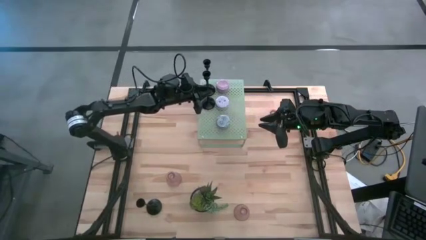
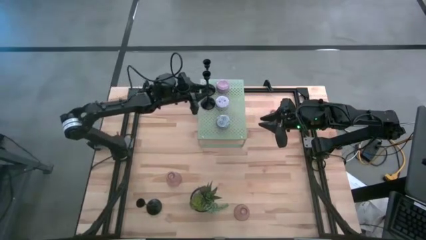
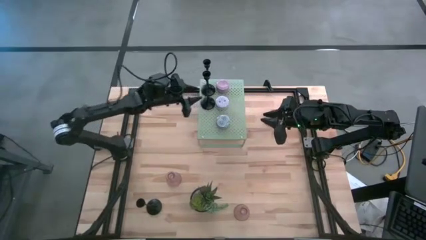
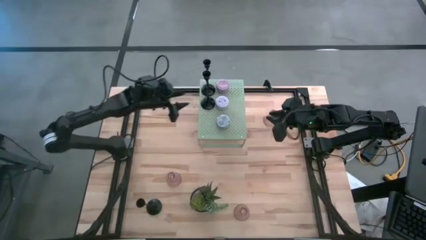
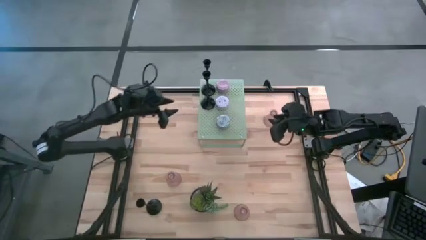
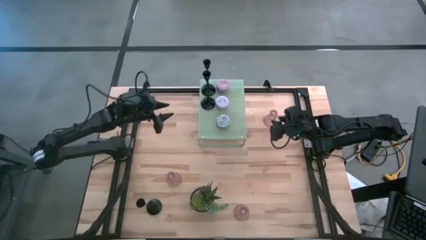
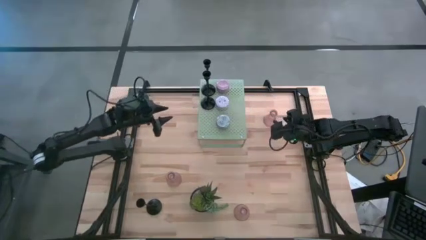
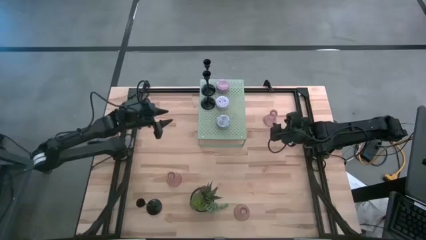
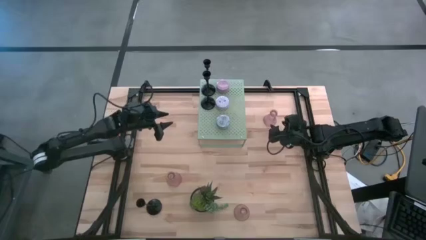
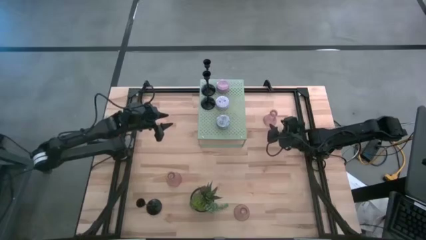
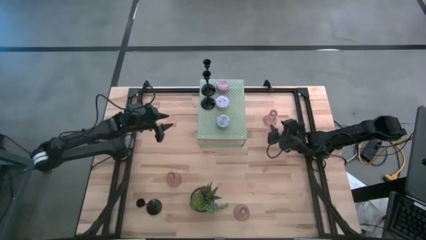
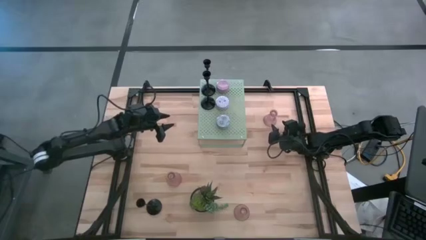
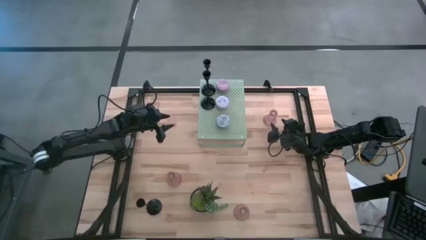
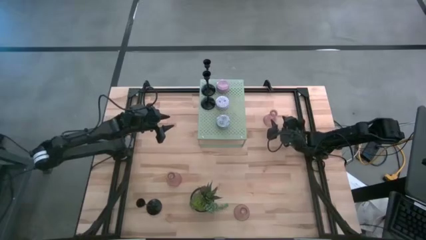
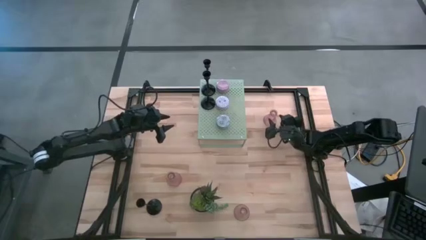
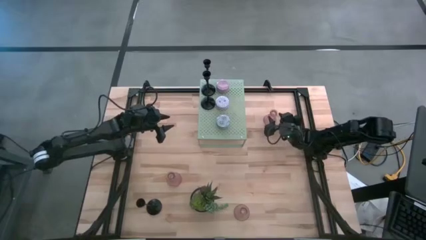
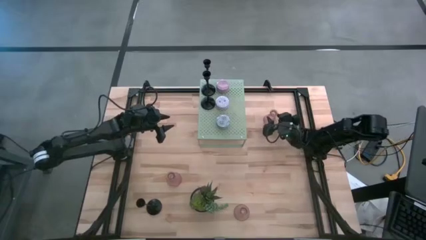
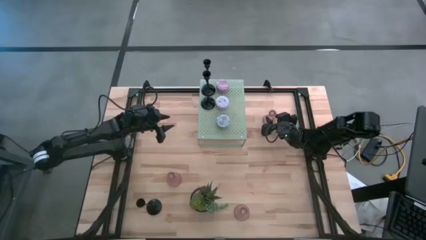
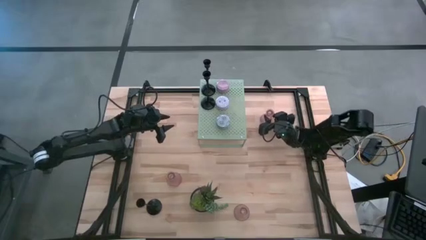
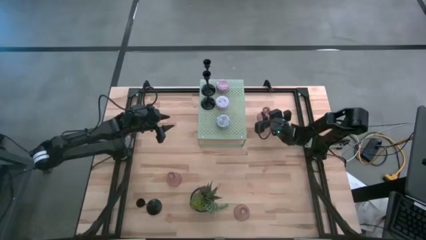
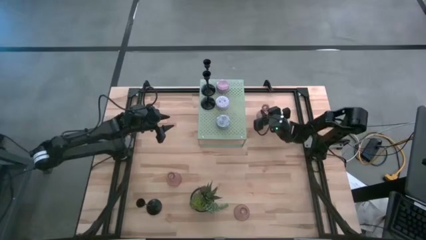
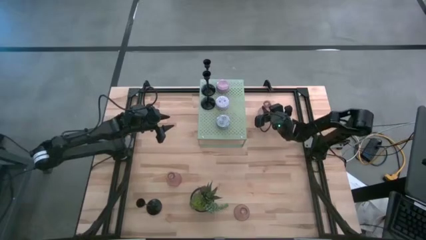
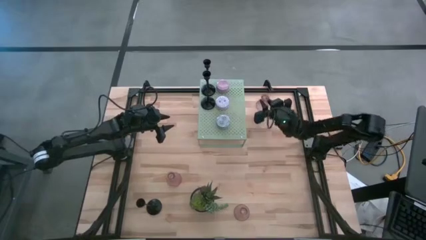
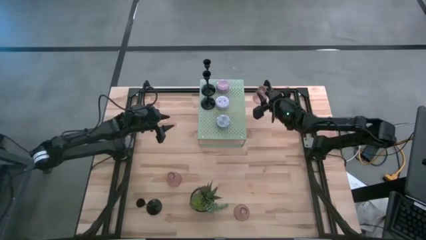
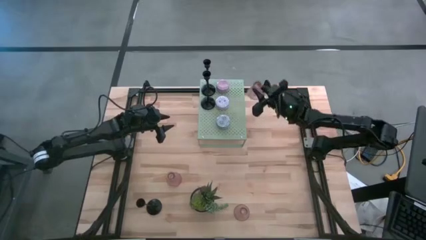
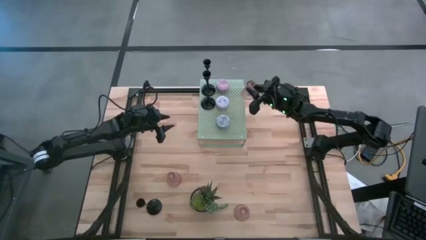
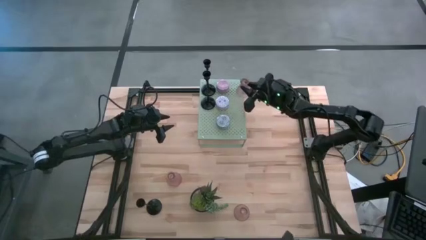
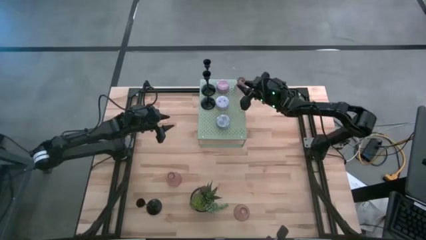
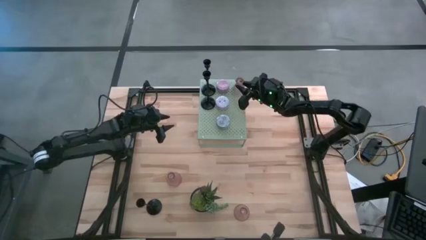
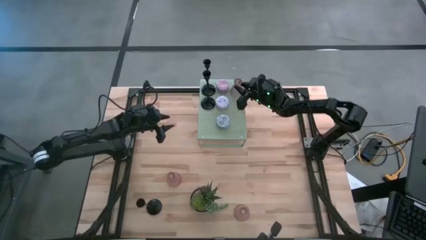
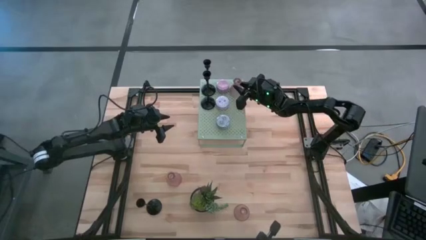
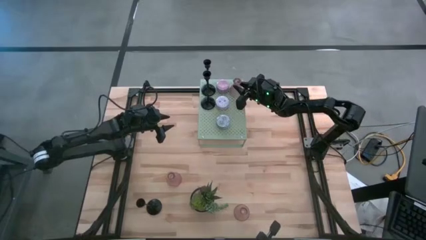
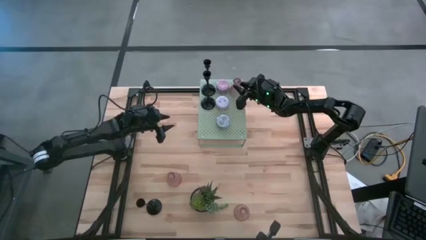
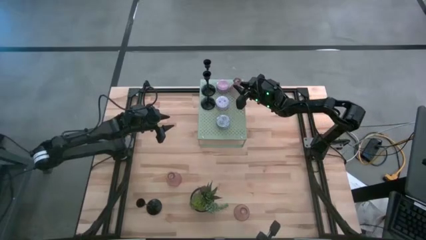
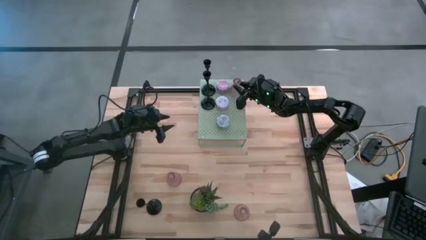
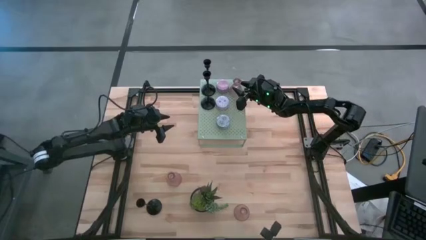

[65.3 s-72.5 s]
Task: Pick & Place candle stick holders
Put the top right pink glass candle holder on the shelf

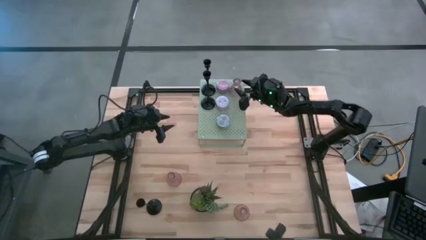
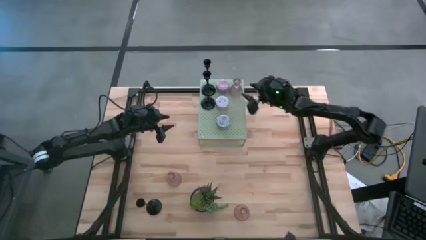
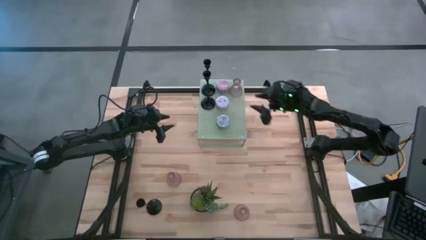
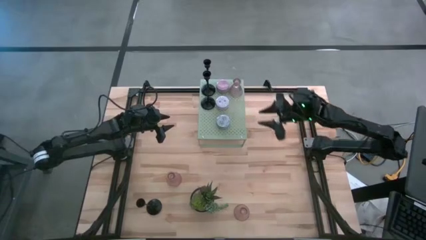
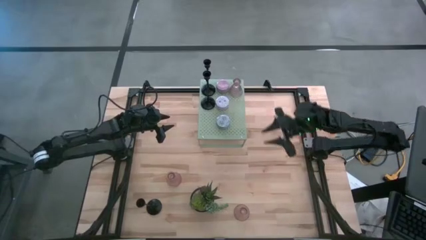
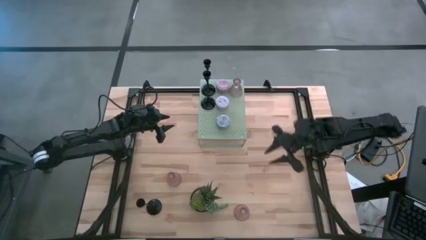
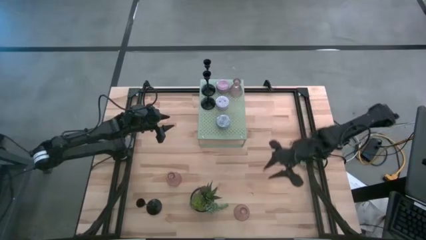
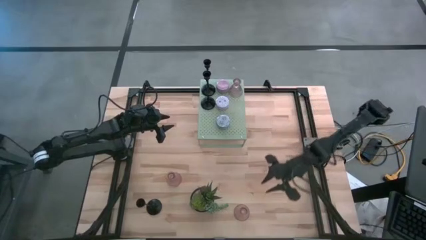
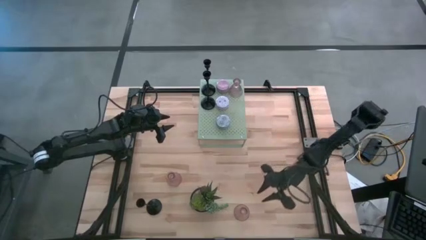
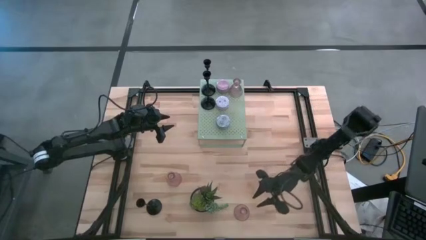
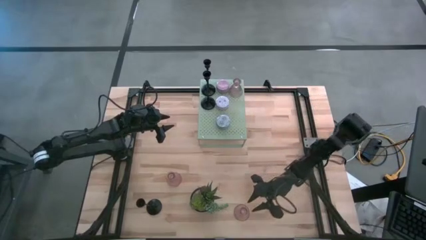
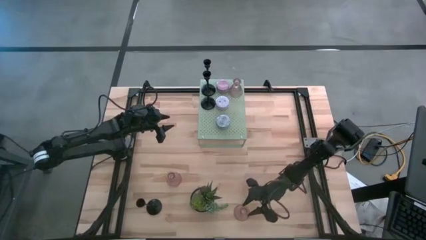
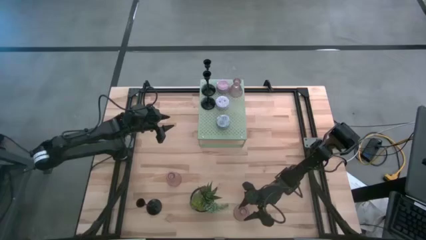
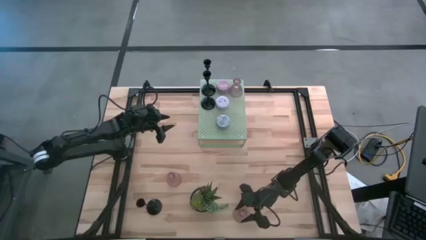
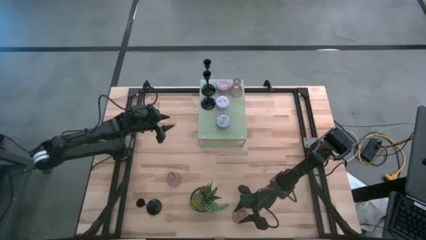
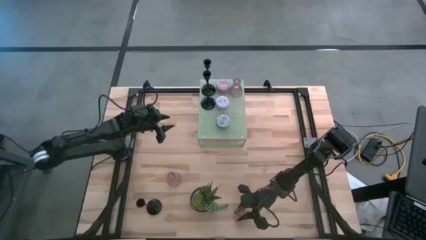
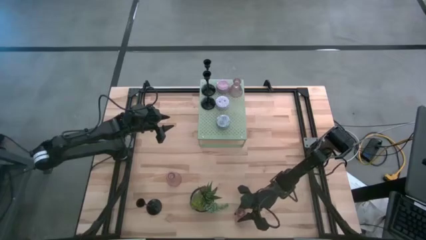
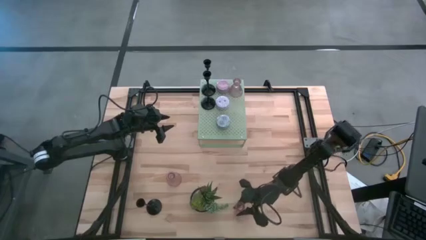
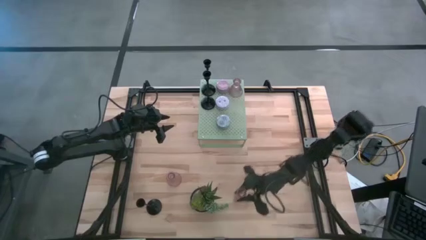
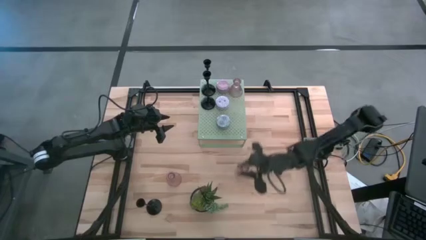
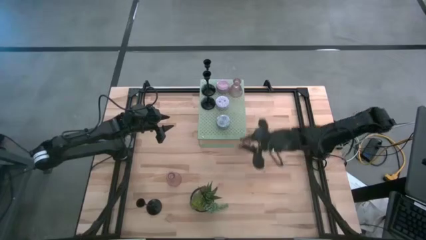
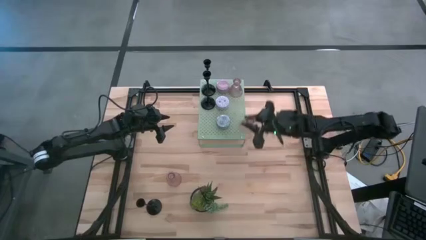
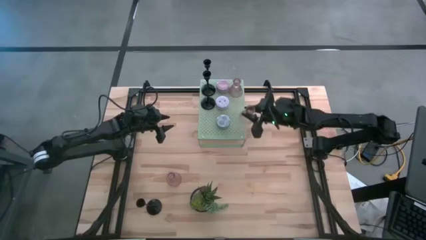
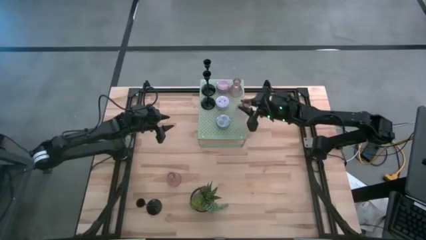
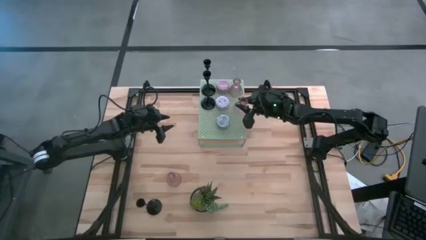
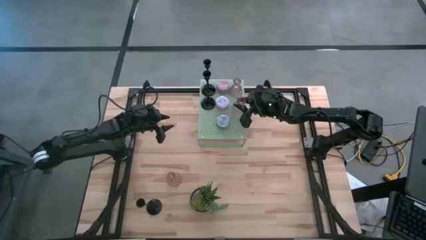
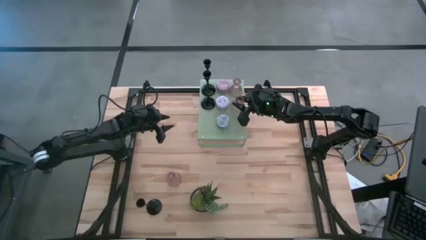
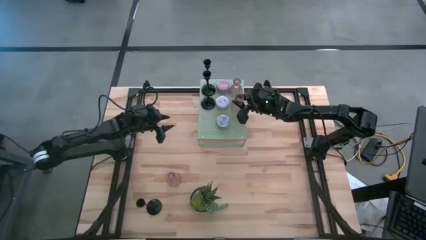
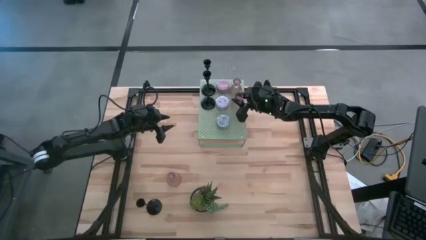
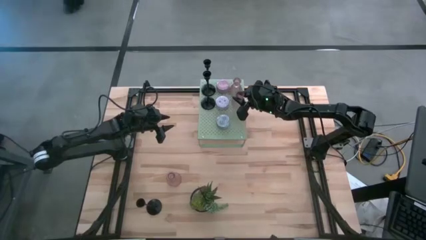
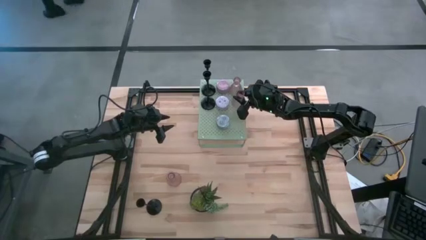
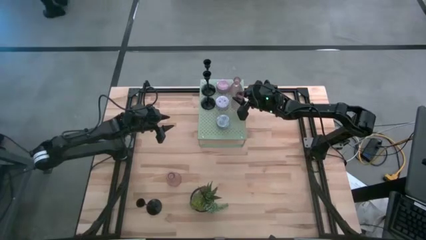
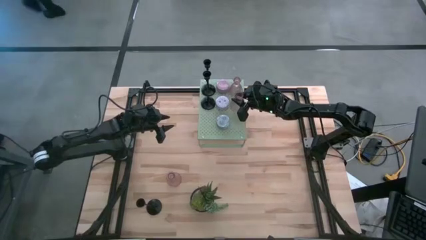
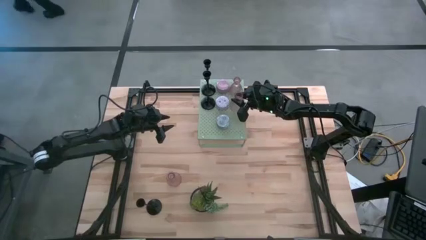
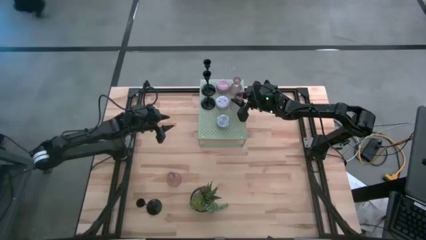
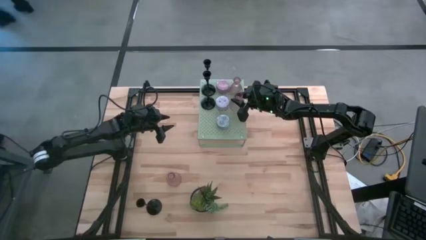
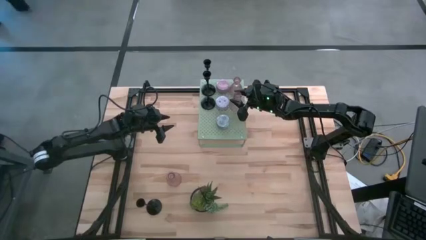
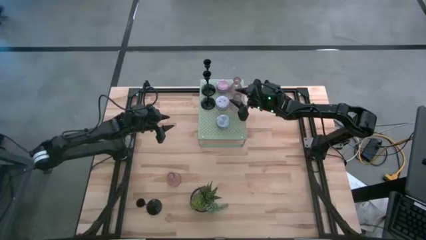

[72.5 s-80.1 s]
Put the right pink glass candle holder on the shelf aligned with the other pink glass candle holder

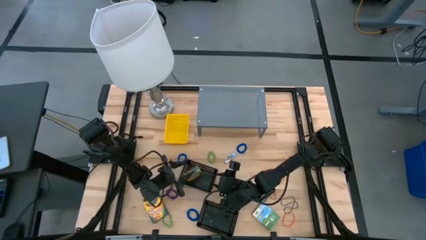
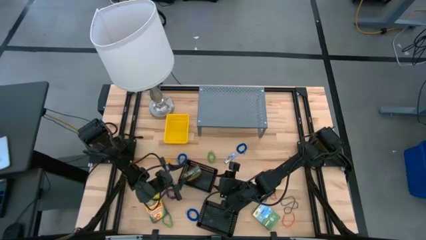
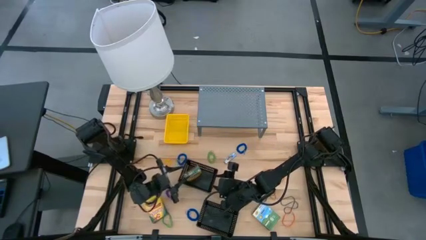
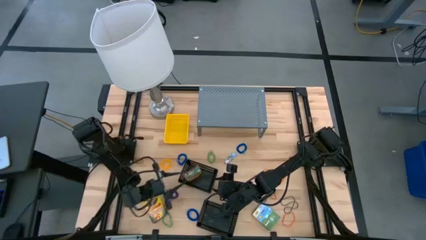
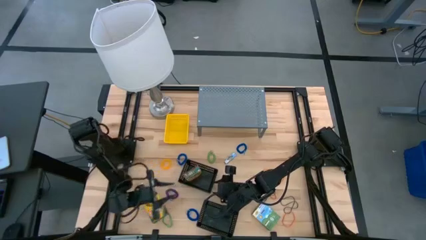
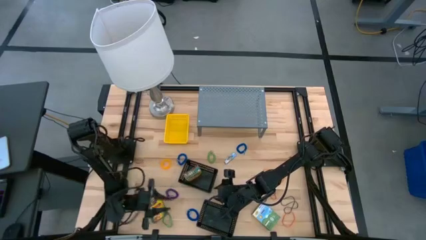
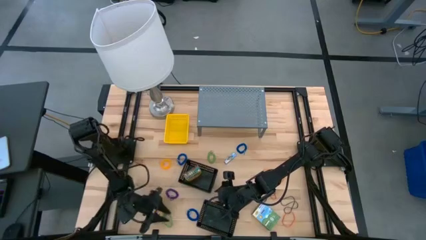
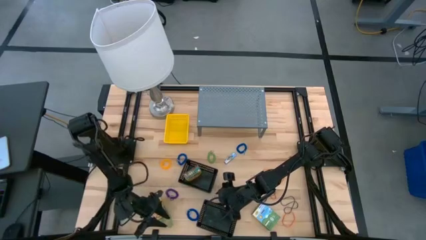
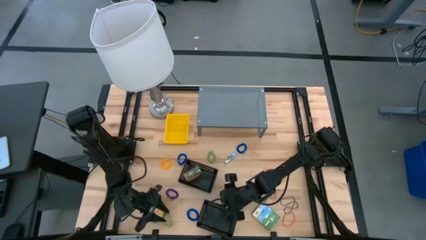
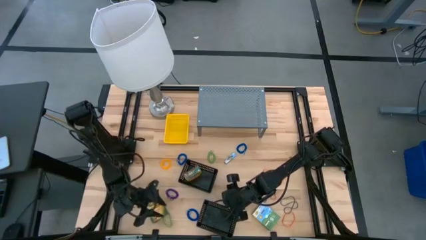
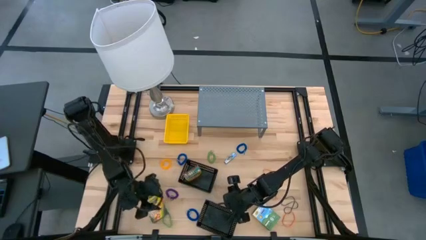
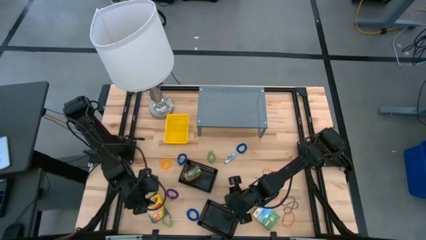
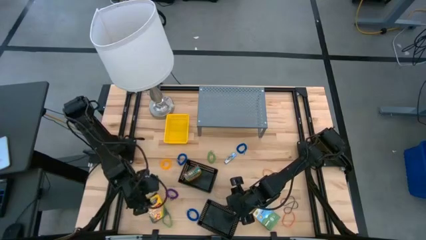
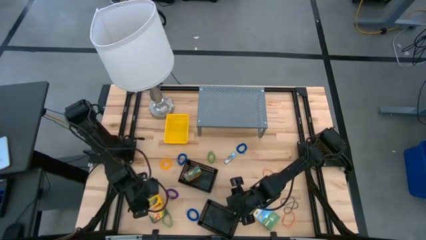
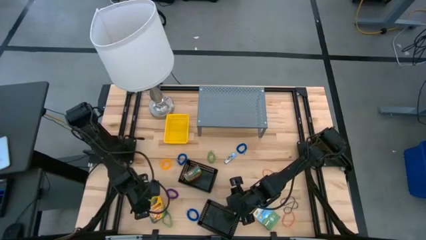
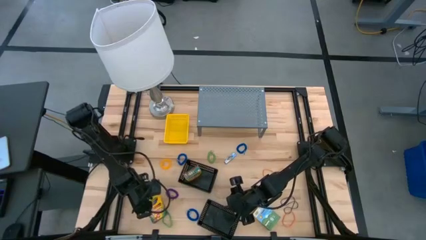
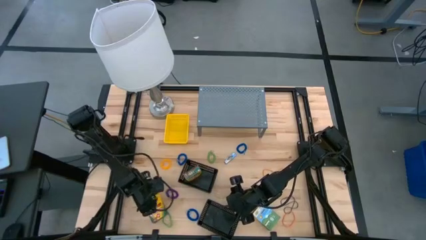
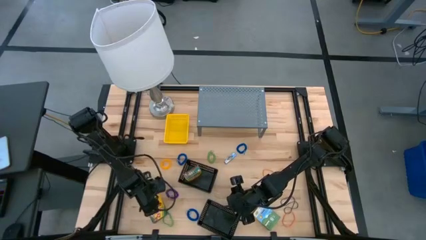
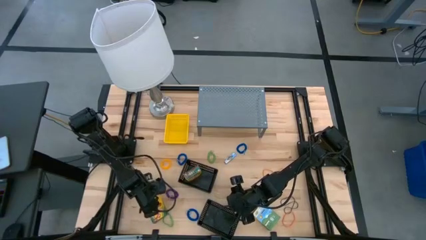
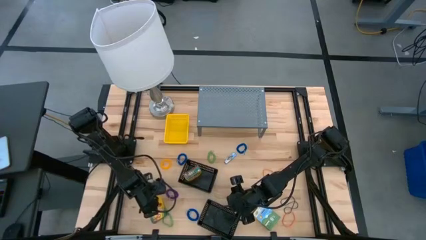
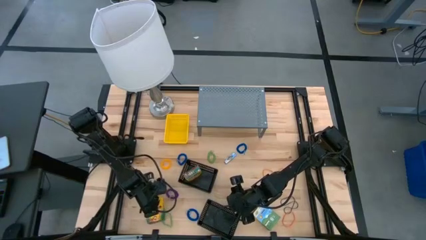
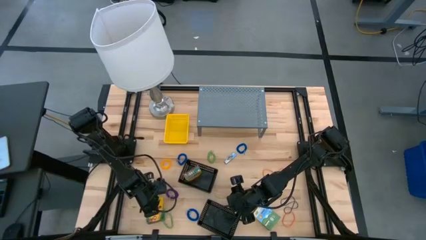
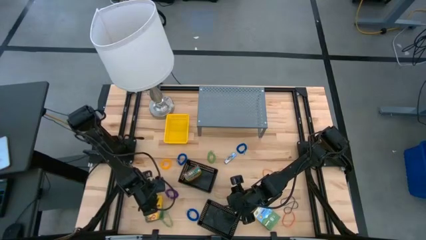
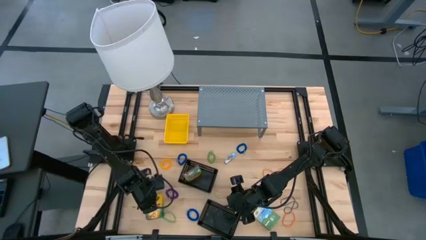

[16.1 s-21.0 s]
Task: Pick & Place Office Desk Supplies
Put the large yellow crayon box into the top black bin
